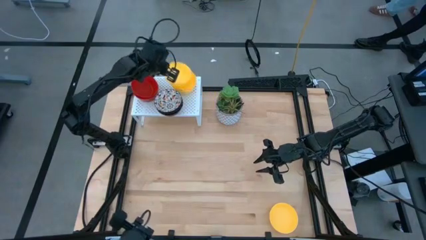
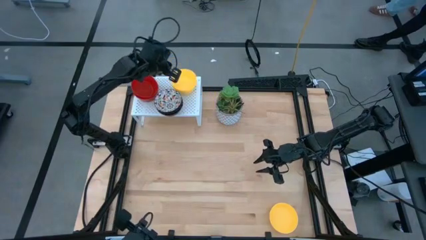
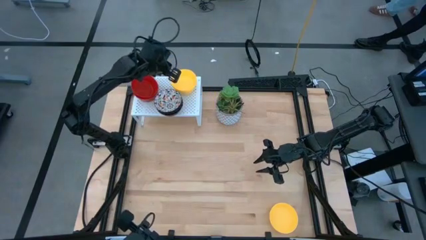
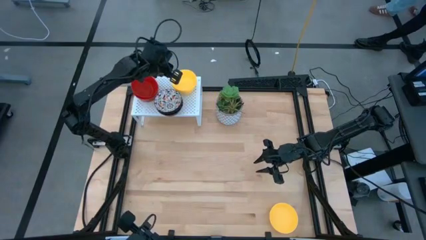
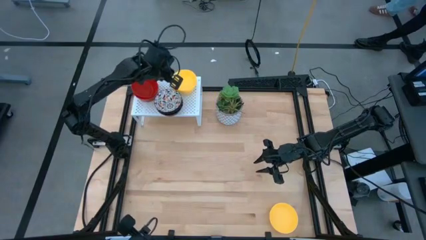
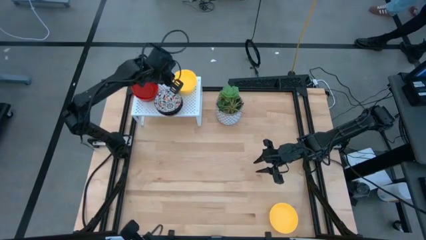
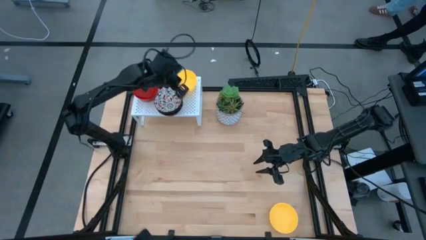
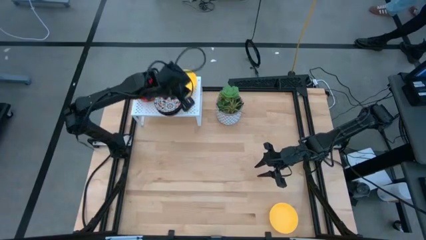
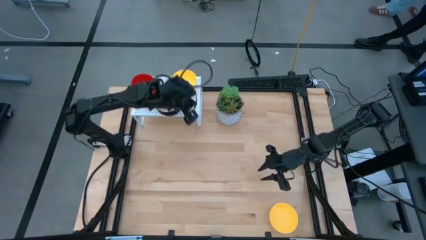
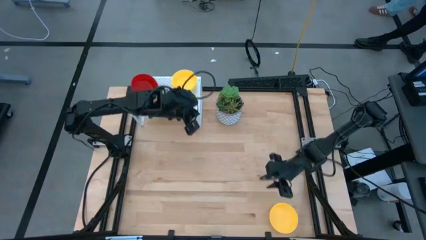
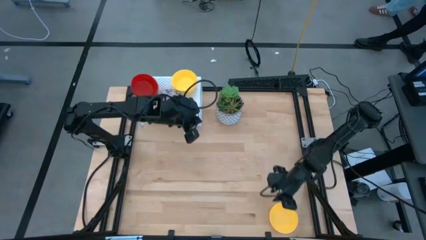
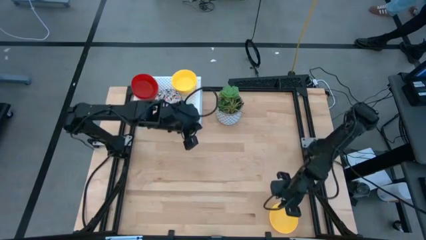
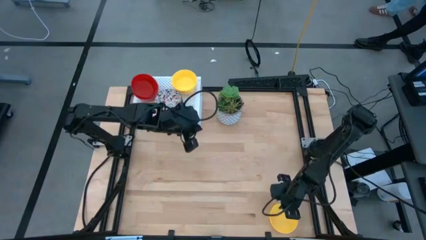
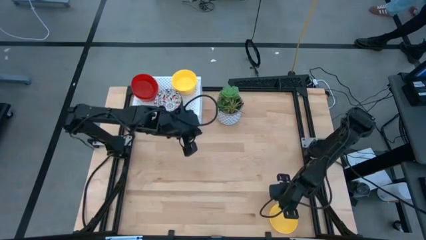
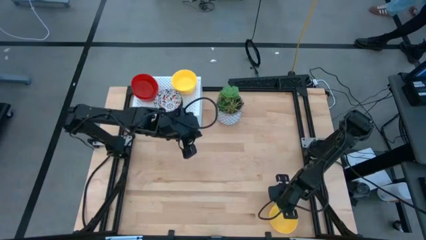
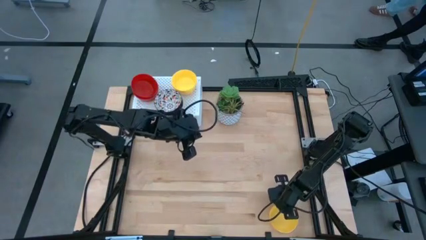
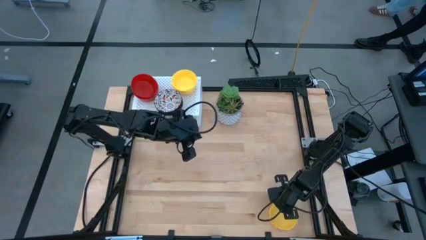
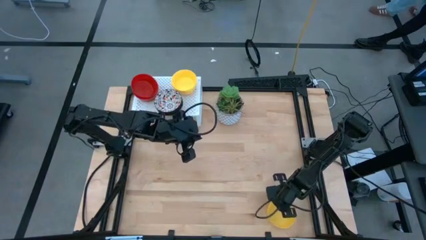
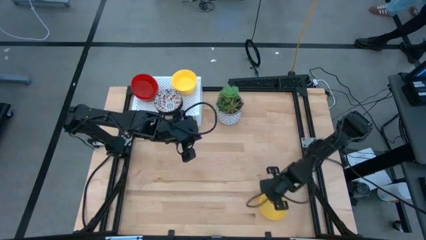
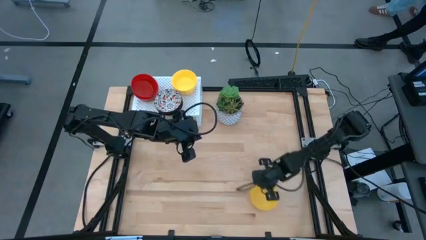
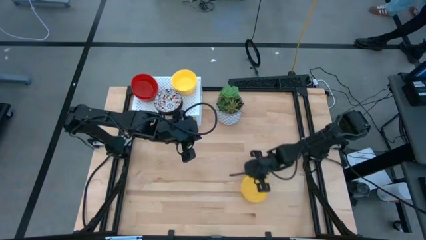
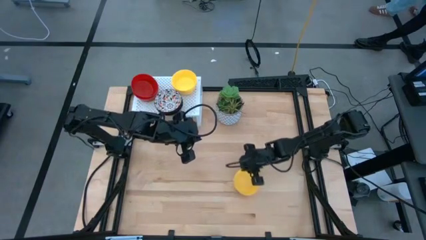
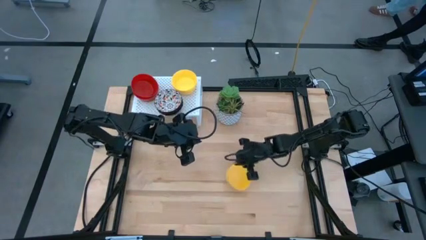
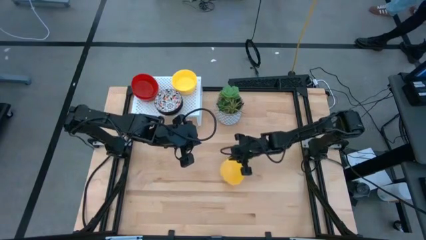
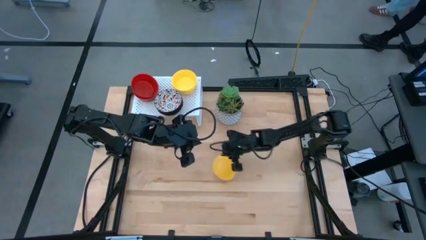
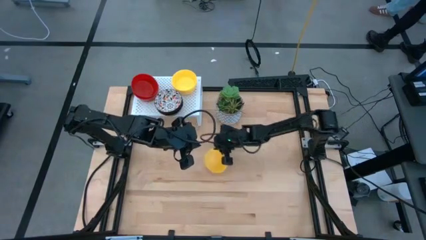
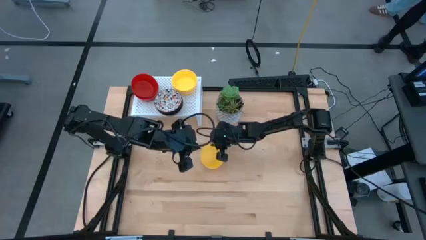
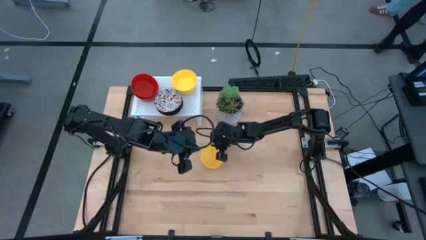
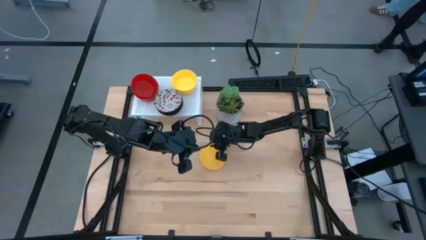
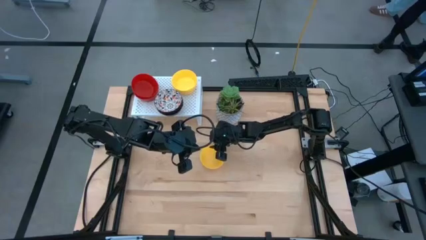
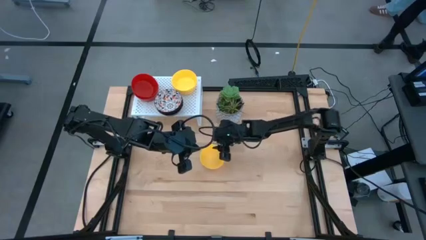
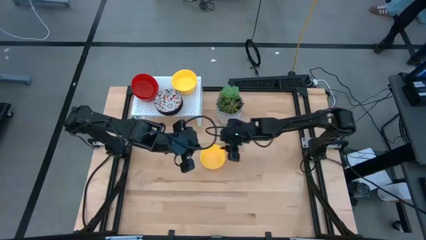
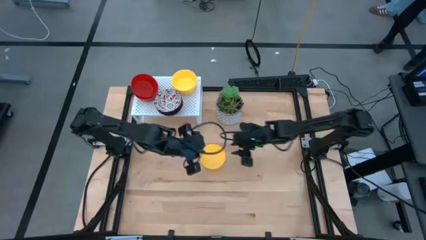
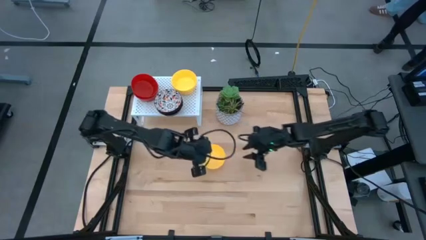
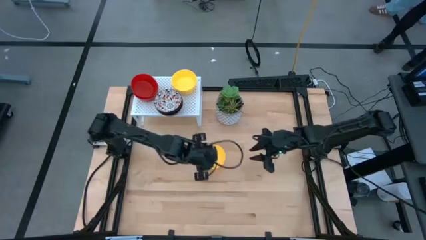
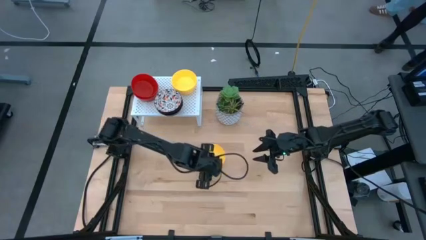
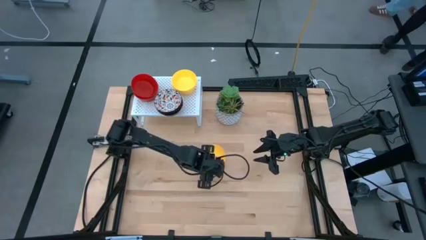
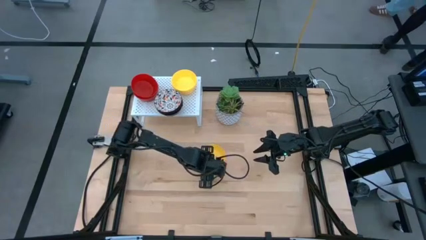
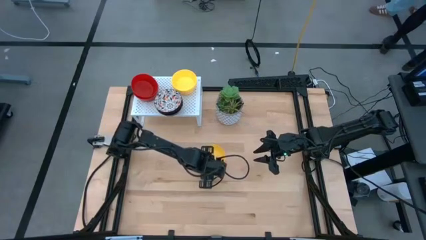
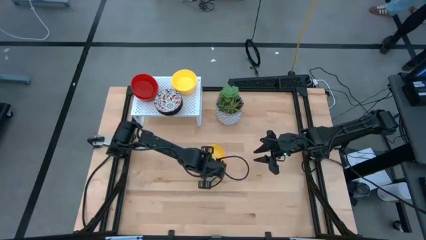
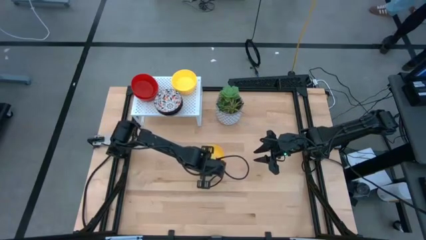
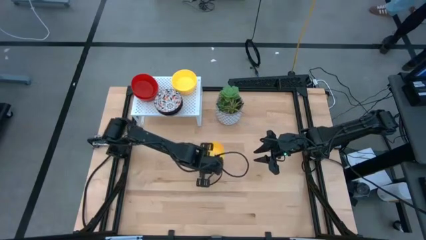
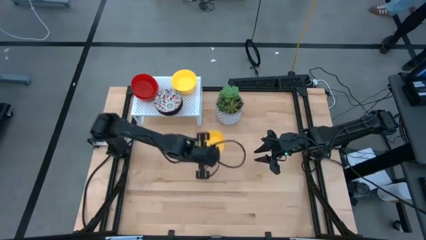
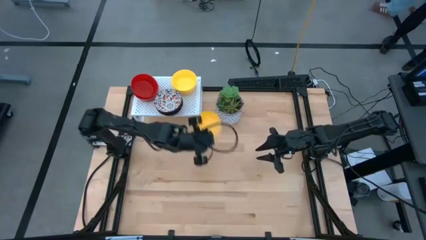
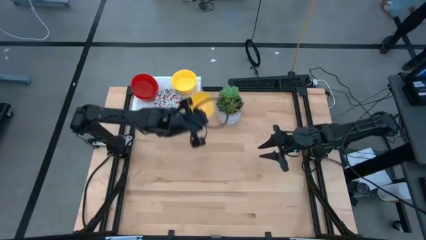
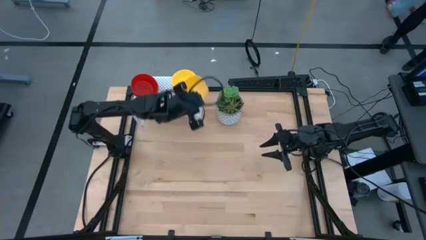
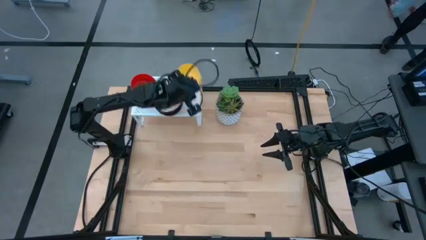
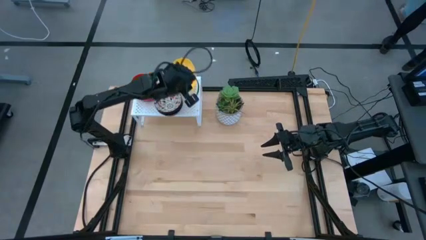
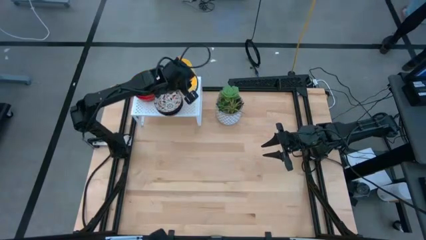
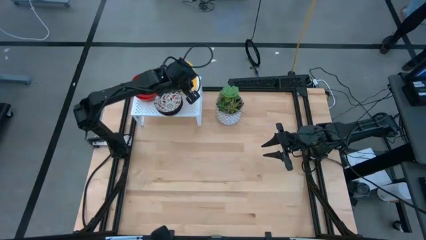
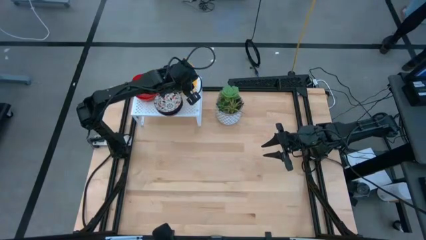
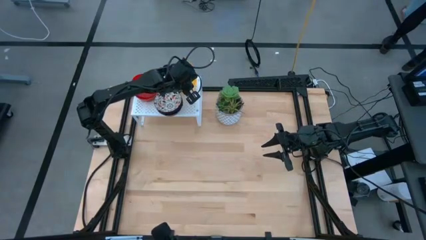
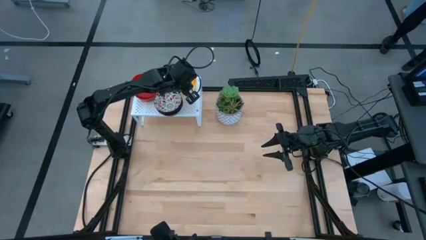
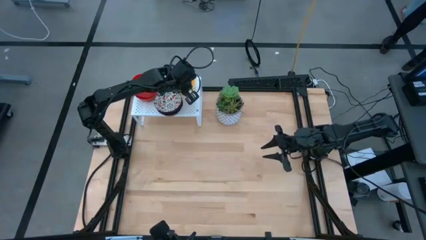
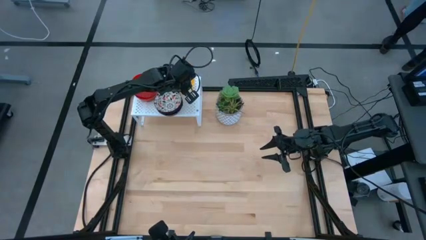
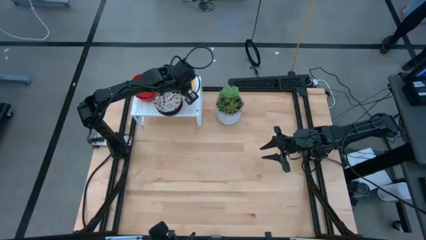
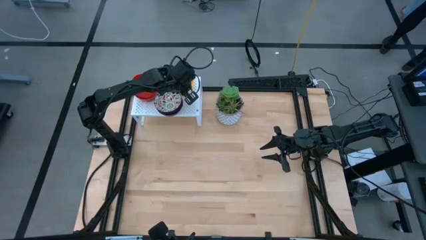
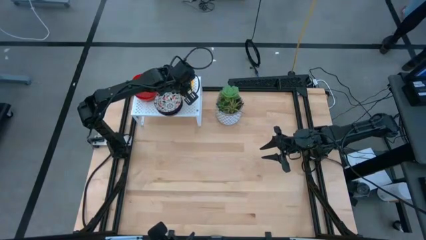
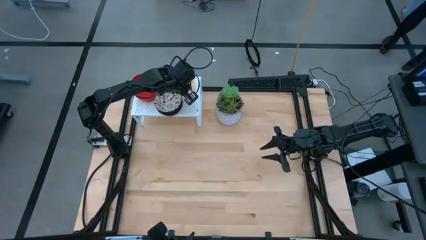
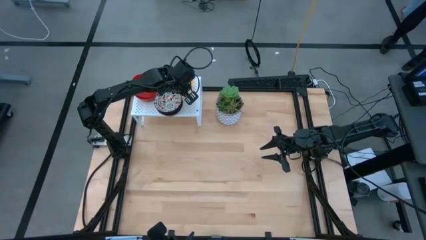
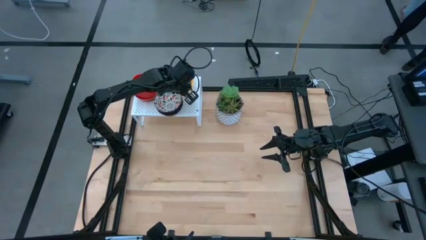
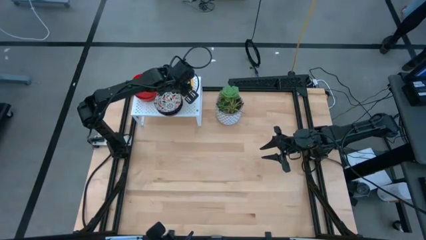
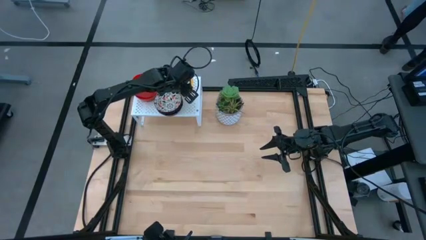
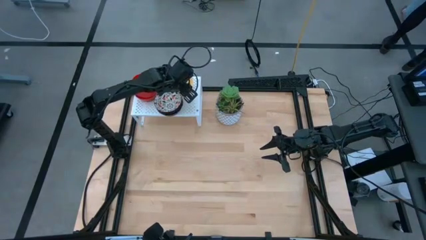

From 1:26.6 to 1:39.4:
Task: Pick & Place Mini bowls
Stack the yellow bowl on the yellow bowls on the shelf

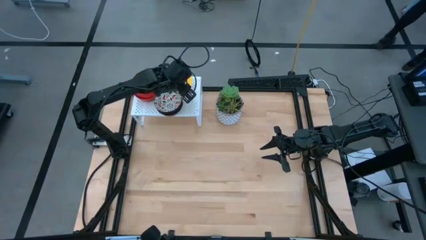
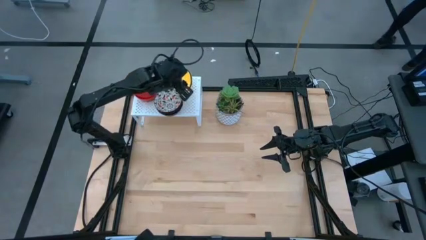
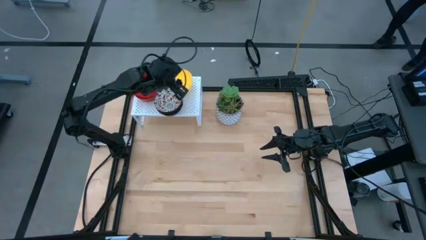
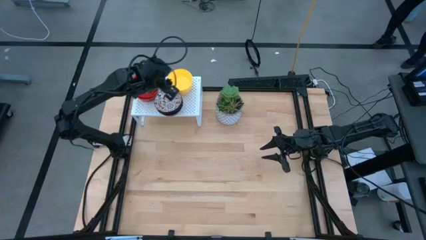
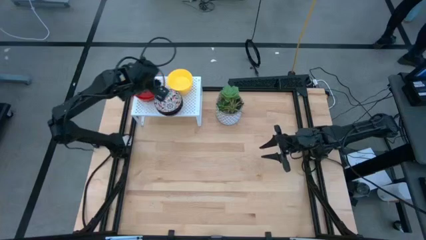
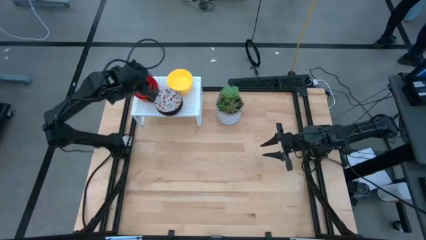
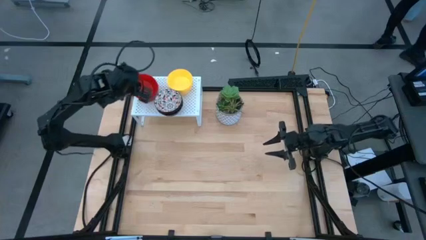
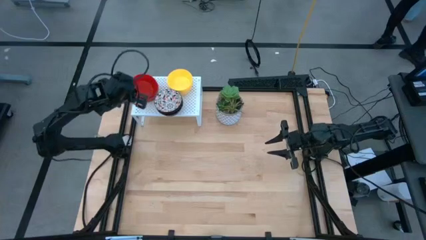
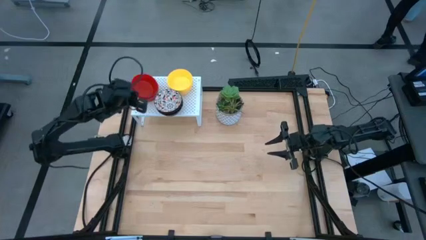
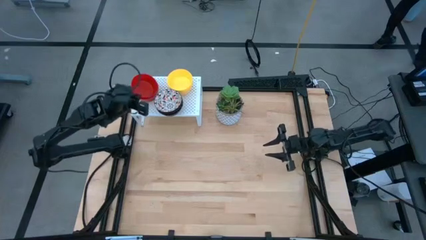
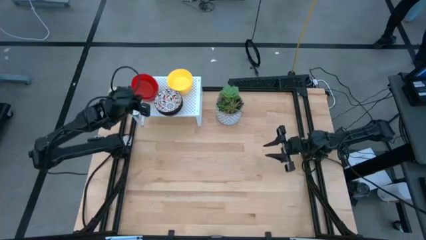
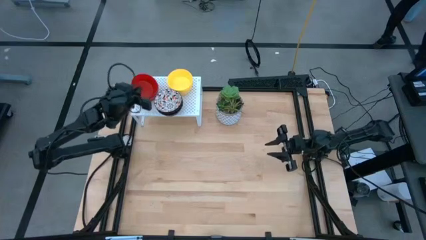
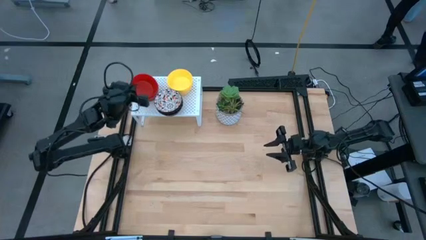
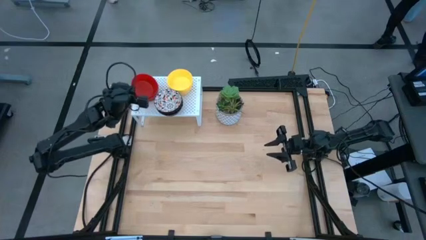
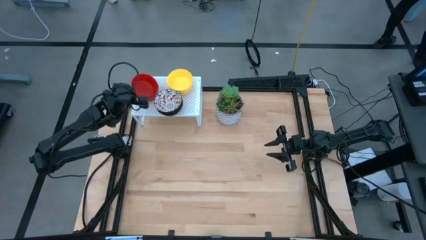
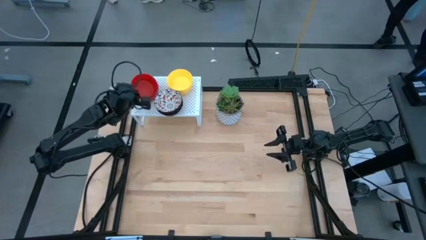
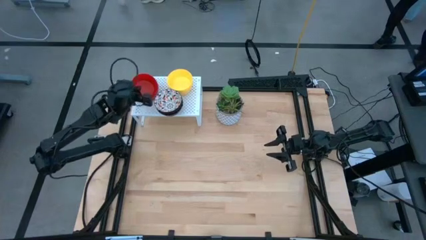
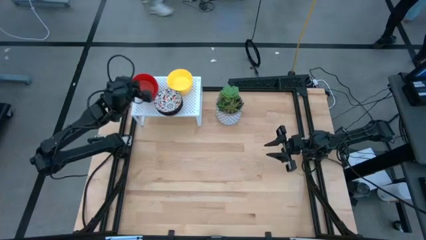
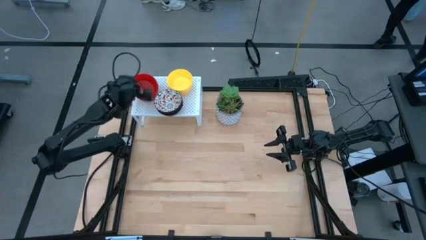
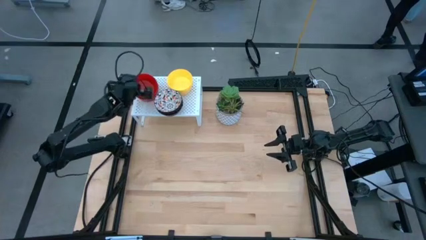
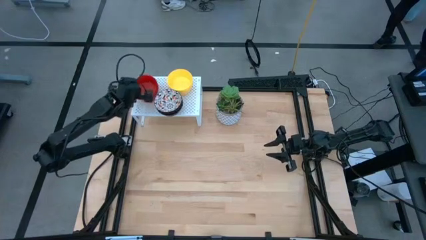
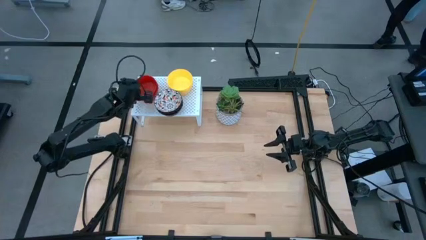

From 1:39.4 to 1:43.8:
Adjust the stacked red bowls on the shelf
